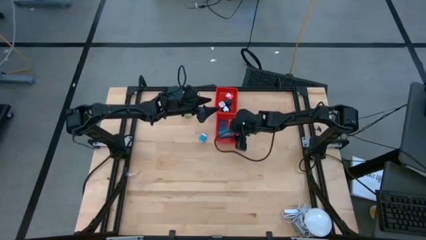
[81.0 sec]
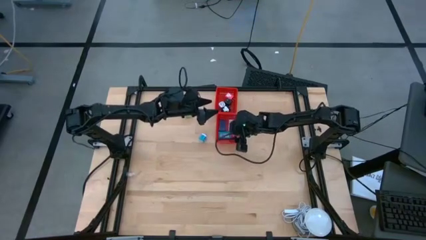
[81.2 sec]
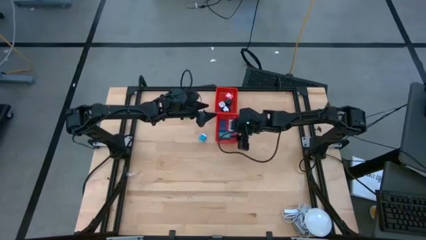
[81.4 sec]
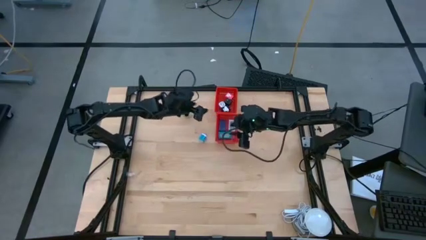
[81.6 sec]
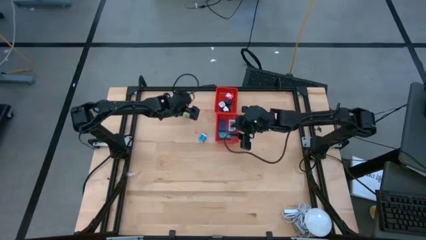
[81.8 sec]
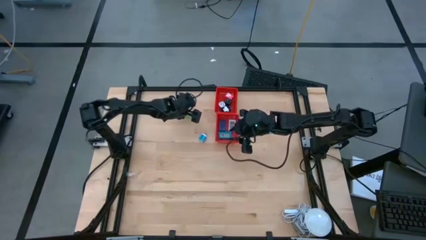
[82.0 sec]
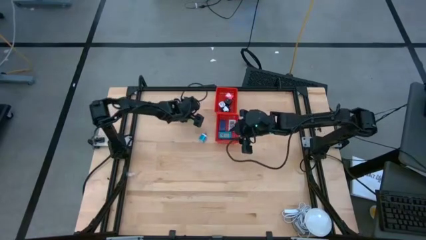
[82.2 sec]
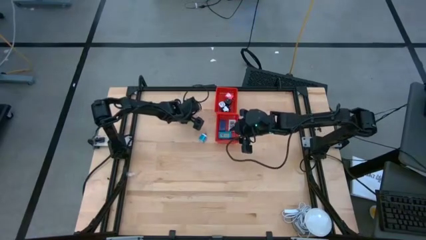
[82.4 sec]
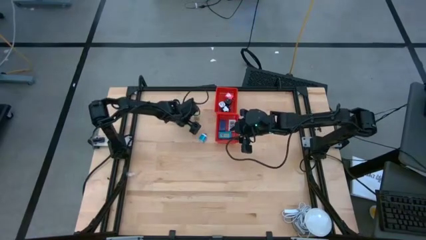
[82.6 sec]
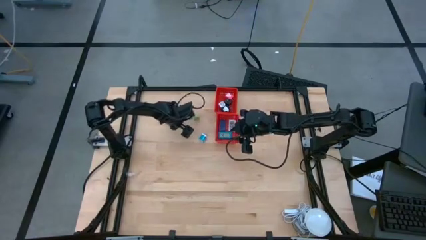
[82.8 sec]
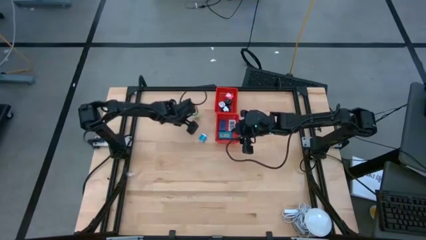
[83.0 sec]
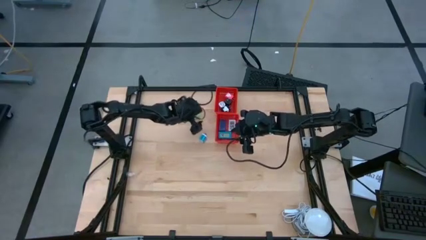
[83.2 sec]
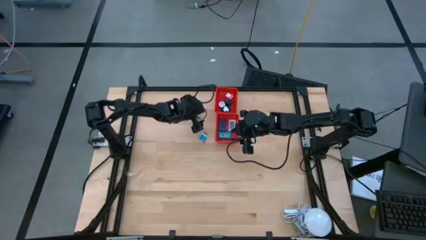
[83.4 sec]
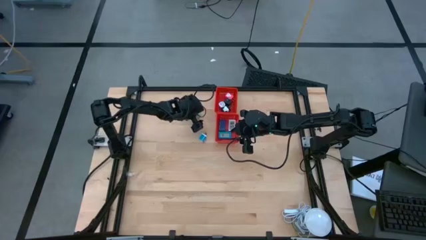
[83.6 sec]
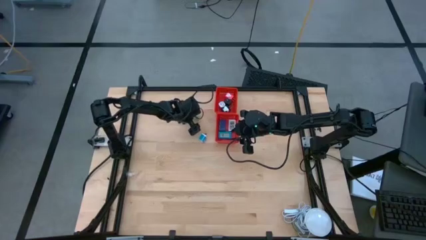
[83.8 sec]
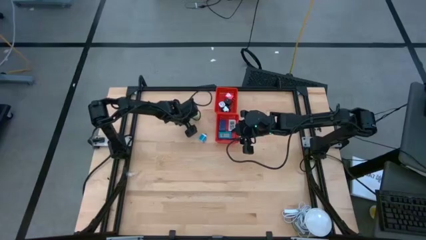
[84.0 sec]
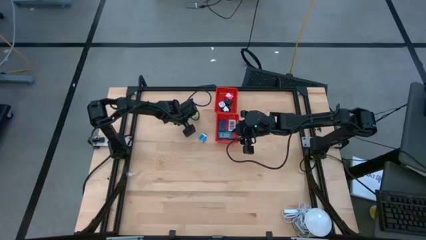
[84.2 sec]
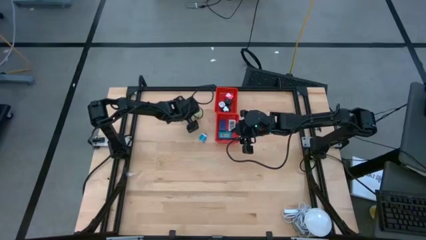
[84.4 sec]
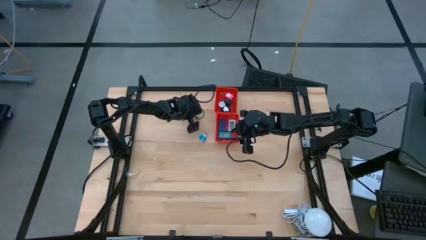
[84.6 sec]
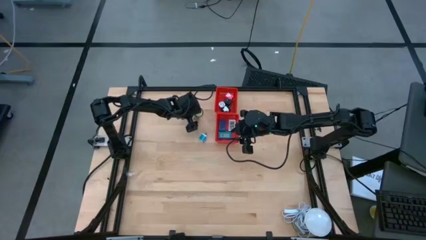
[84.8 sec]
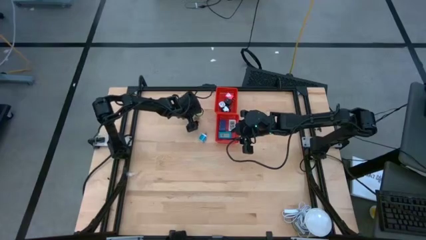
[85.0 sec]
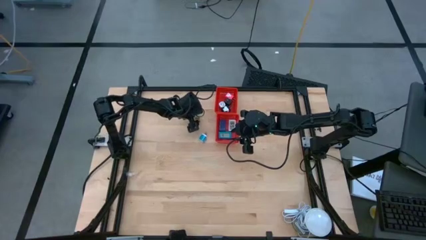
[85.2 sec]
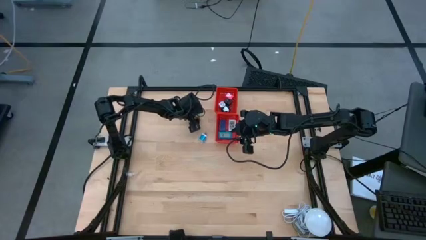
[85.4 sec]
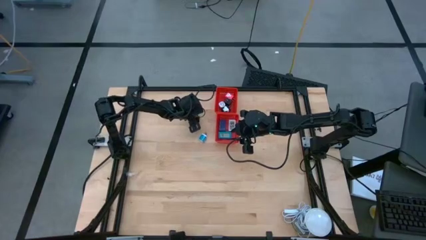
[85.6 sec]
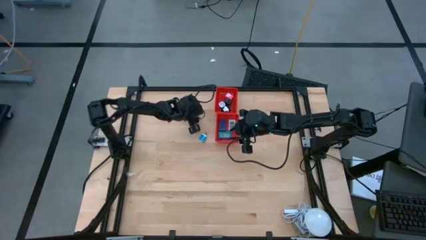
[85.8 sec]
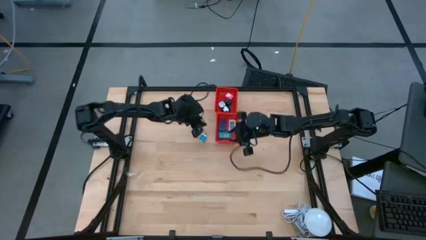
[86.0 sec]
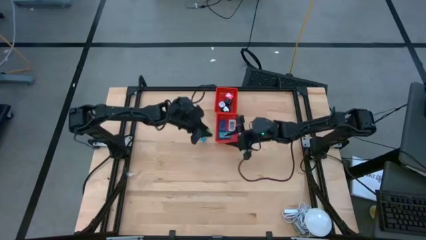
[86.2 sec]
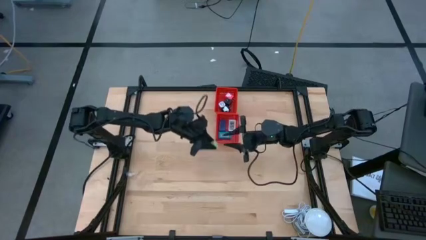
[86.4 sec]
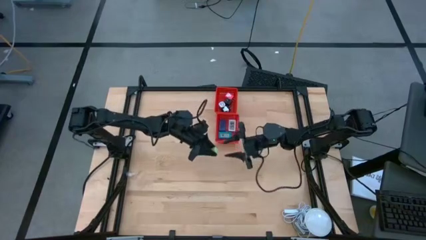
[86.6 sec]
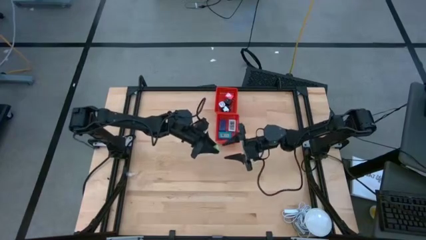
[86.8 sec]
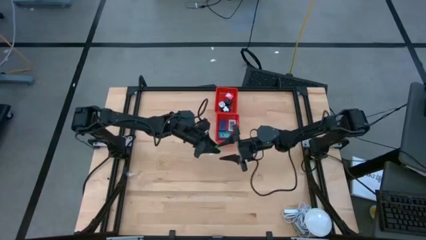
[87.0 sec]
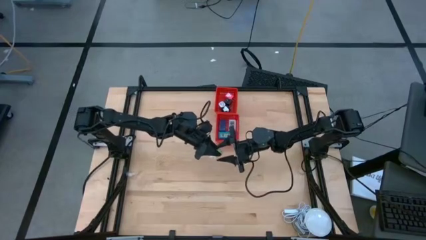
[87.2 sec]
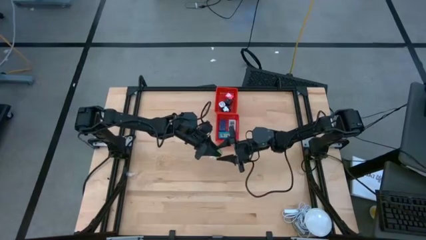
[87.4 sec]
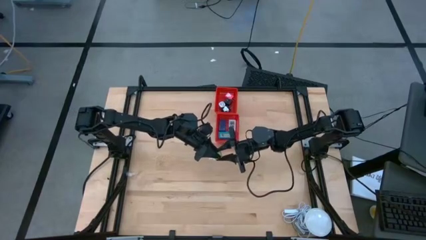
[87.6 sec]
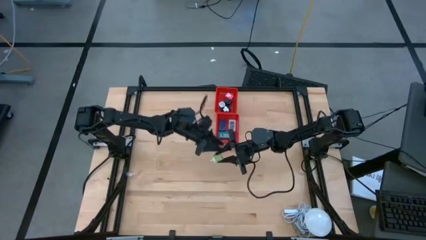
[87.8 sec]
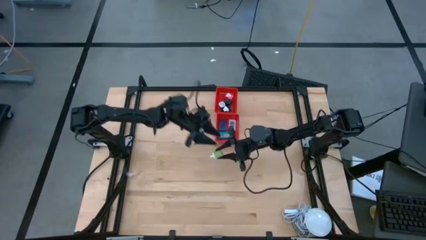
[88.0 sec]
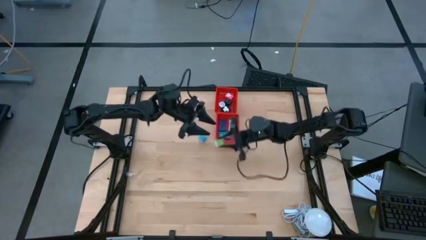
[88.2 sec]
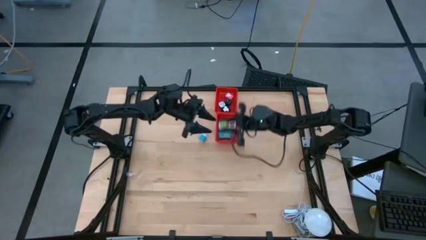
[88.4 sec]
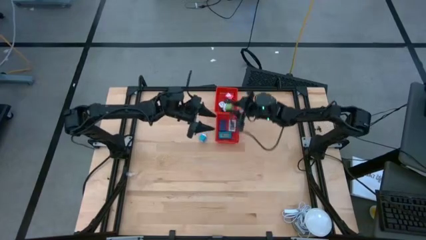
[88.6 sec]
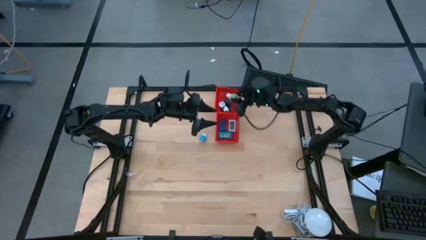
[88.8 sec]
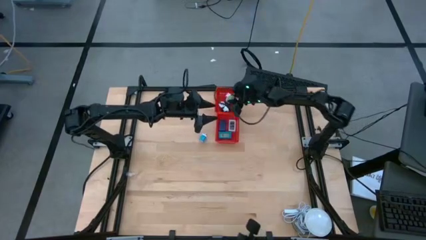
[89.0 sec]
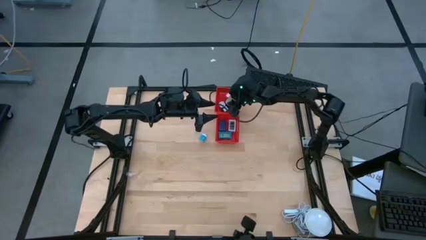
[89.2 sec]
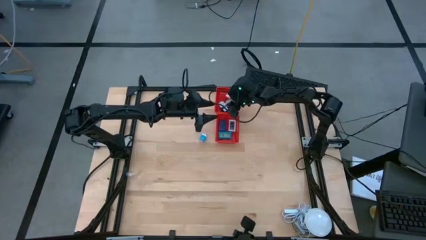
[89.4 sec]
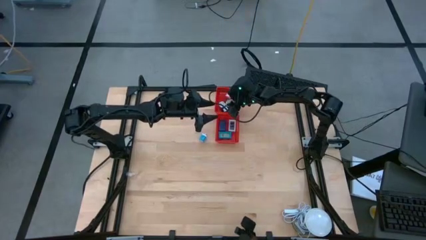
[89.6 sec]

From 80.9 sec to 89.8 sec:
Task: Pick & Place Office items
Put the green charger adapter into the top red basket

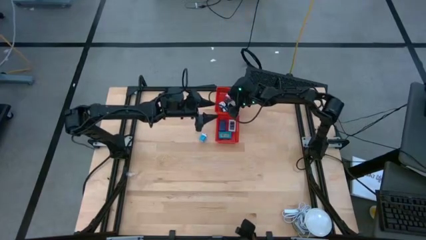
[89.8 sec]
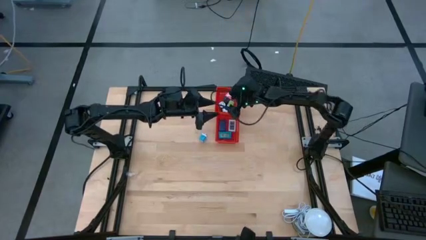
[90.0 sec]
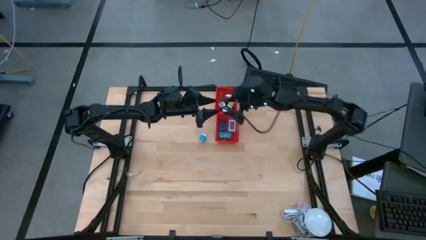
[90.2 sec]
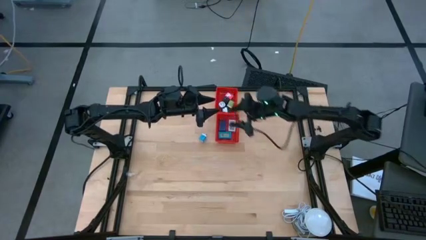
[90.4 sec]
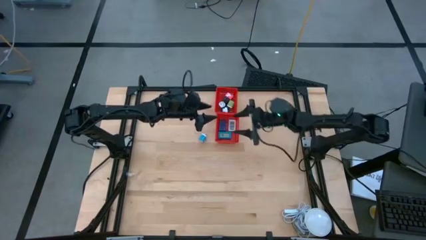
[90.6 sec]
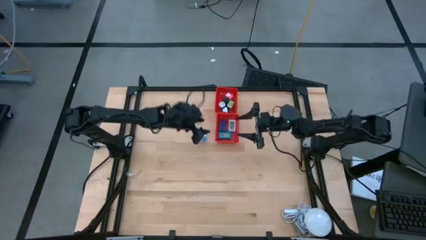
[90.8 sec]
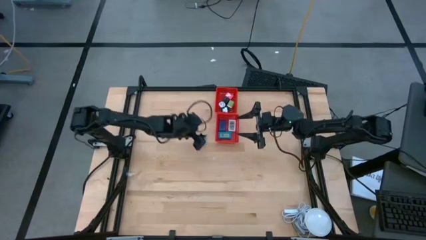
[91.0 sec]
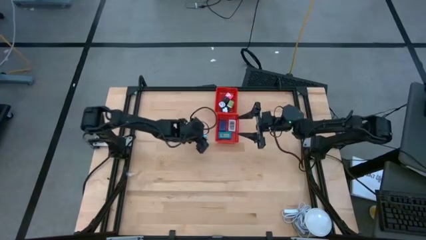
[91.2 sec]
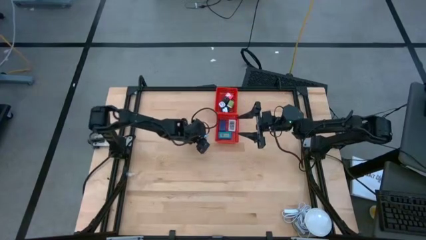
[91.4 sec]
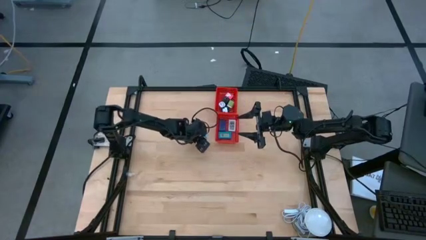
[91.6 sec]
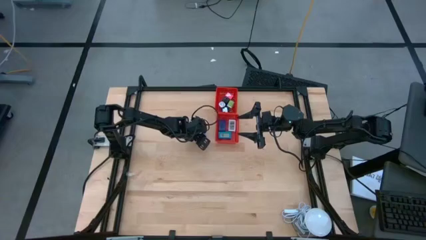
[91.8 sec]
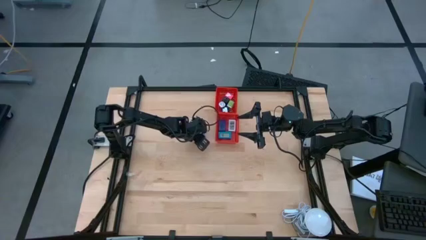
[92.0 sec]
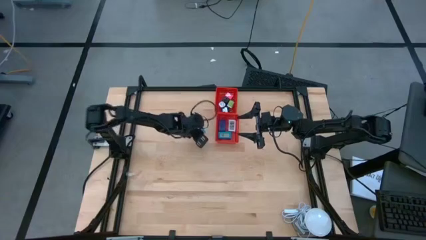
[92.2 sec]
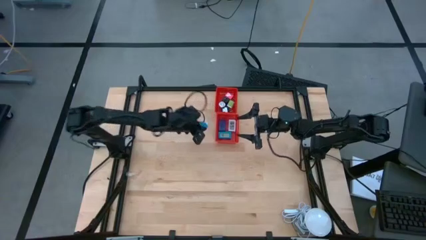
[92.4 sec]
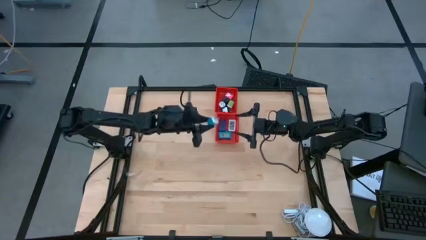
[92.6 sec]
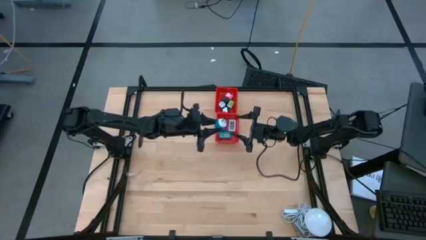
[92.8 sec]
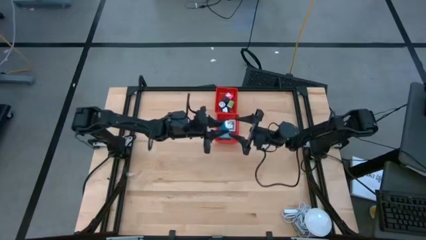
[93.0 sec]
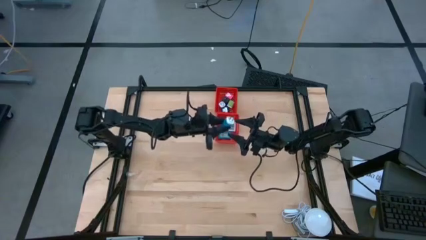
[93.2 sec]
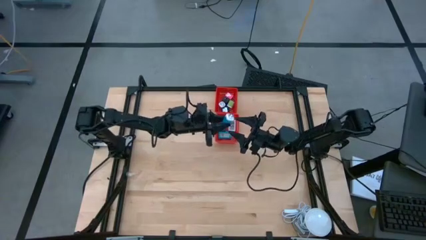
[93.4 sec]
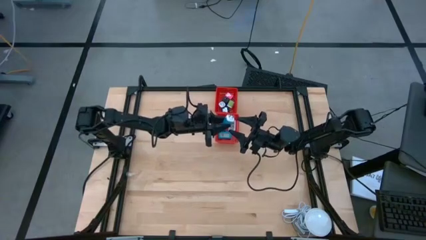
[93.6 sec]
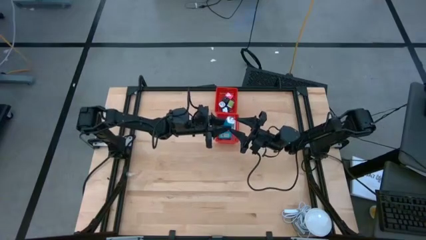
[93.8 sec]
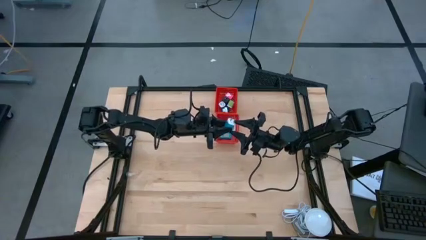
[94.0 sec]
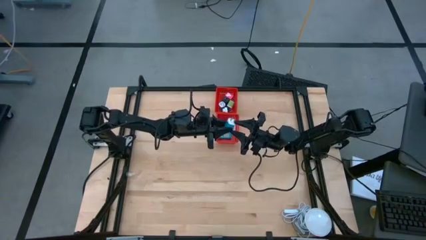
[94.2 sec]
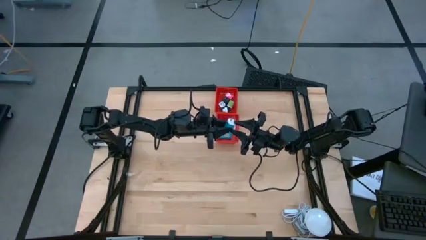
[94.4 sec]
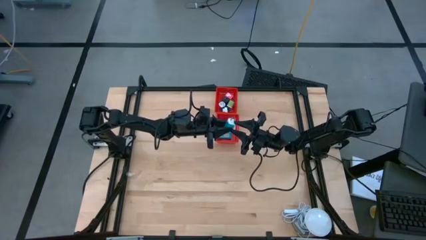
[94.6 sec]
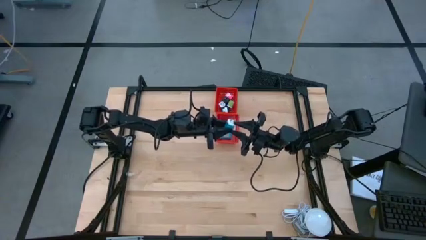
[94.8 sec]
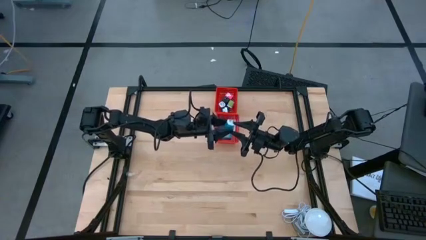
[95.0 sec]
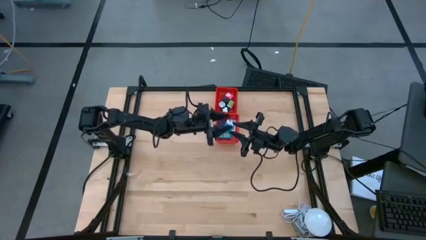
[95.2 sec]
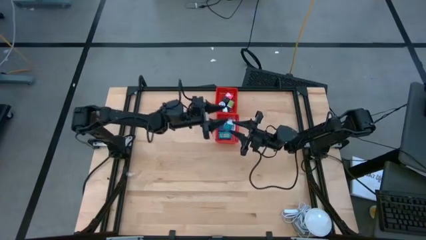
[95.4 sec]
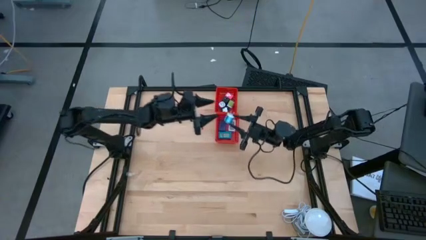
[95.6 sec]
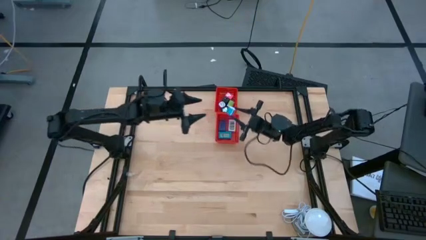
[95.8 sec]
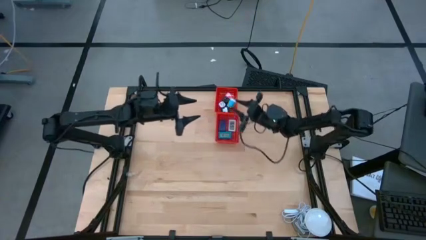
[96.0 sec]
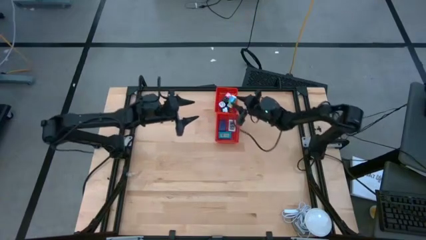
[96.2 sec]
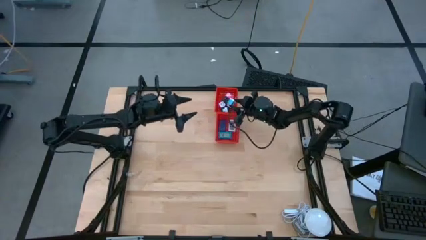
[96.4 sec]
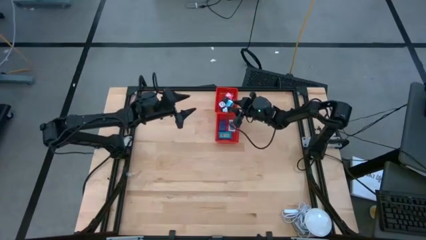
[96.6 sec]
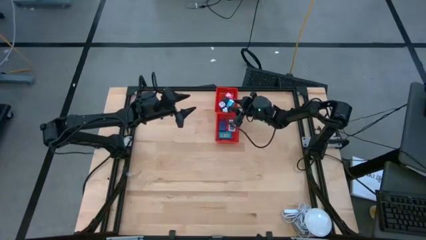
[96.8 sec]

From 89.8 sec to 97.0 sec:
Put the blue charger adapter into the top red basket

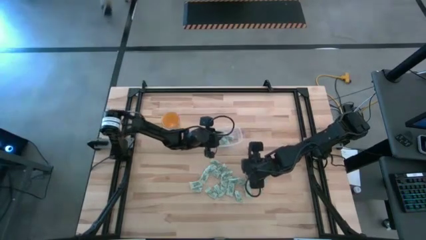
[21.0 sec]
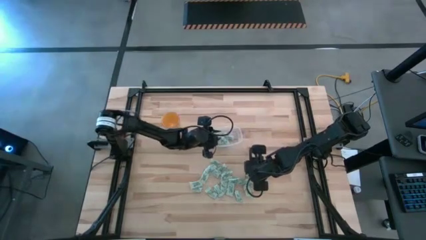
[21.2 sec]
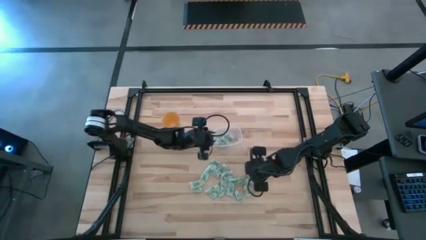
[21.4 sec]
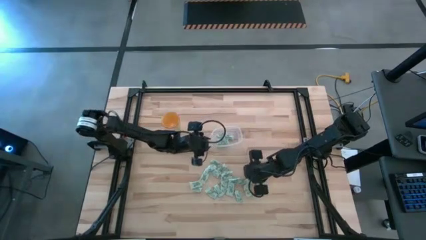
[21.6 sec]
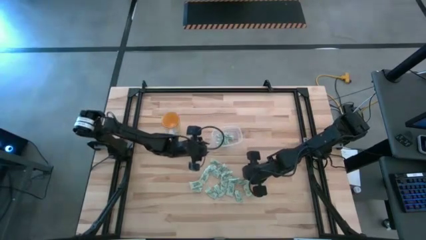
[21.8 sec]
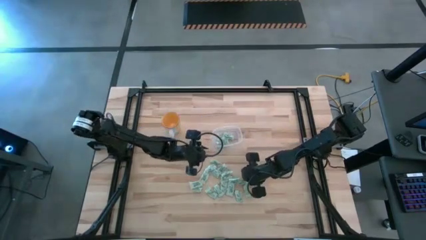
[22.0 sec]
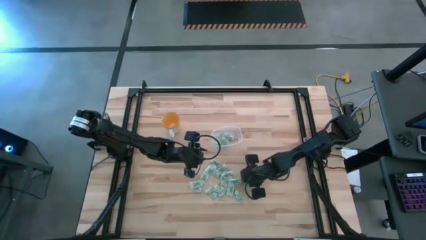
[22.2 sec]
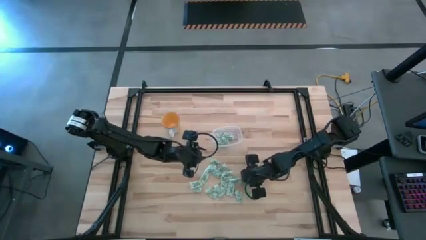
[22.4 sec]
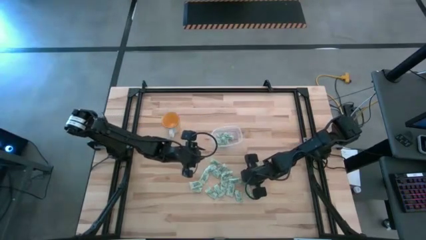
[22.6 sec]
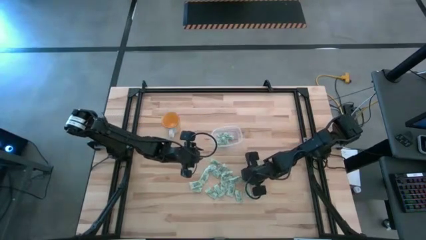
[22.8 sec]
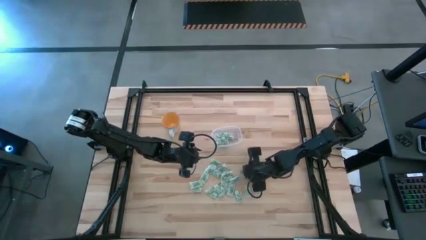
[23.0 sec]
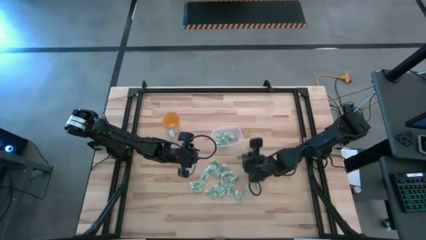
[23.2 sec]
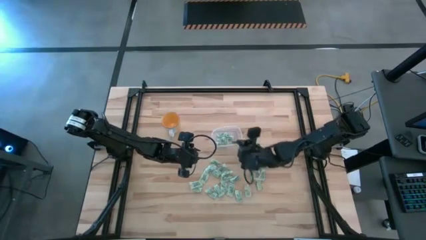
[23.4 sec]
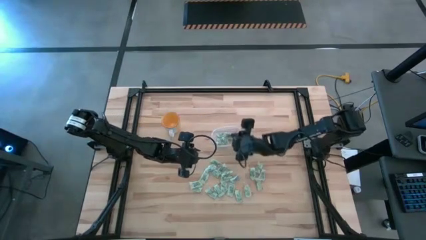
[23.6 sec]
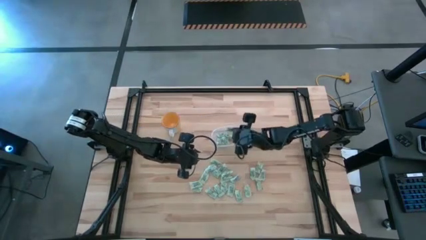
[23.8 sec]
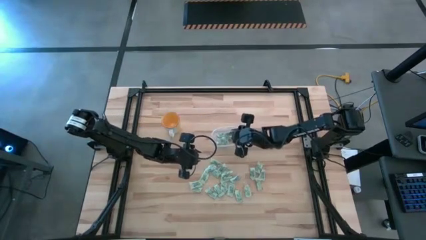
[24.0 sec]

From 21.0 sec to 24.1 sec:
Task: Pick and place Stevia / Truvia into bins
Put the stevia packet into the transparent bin
